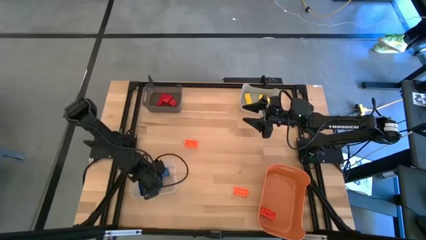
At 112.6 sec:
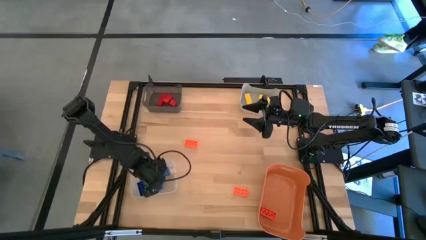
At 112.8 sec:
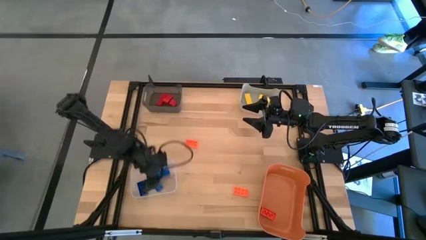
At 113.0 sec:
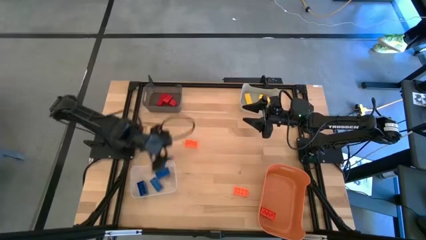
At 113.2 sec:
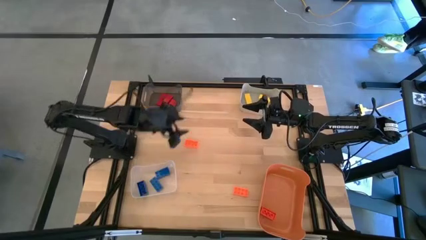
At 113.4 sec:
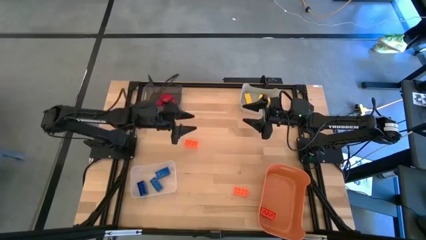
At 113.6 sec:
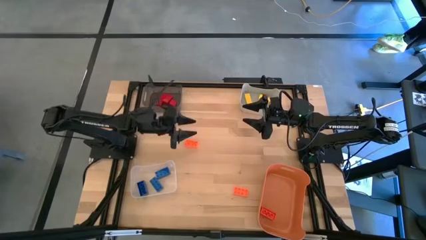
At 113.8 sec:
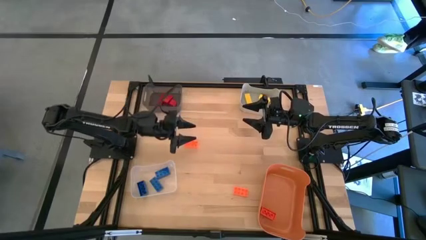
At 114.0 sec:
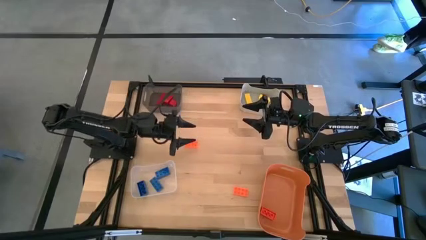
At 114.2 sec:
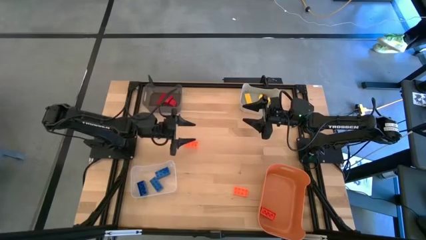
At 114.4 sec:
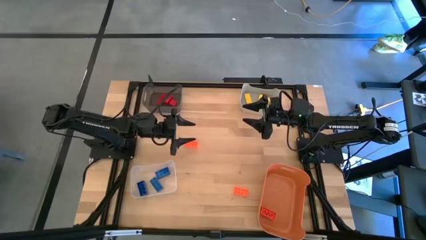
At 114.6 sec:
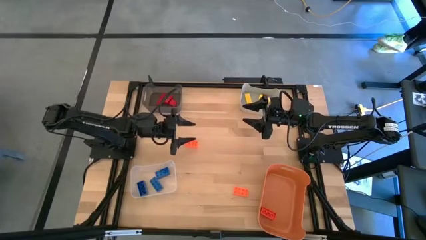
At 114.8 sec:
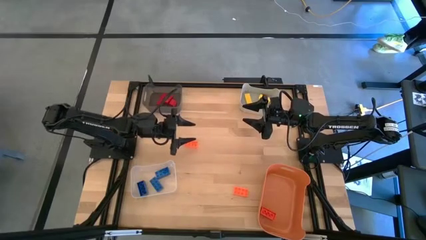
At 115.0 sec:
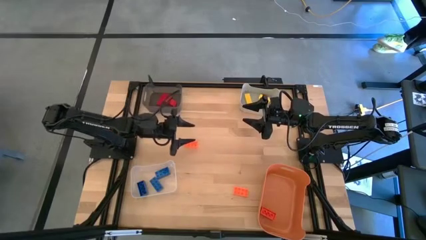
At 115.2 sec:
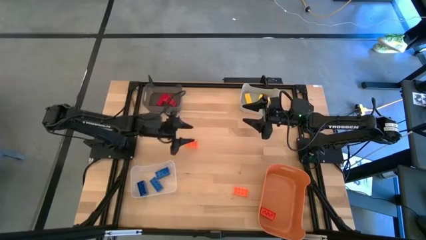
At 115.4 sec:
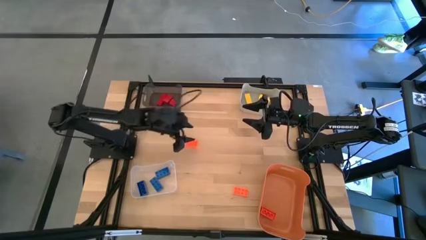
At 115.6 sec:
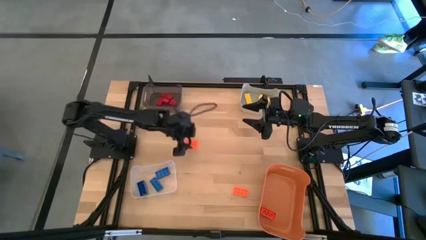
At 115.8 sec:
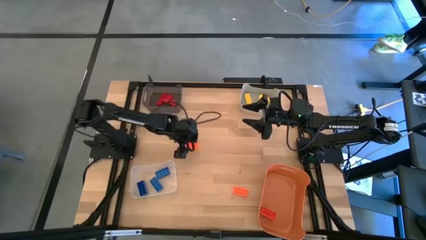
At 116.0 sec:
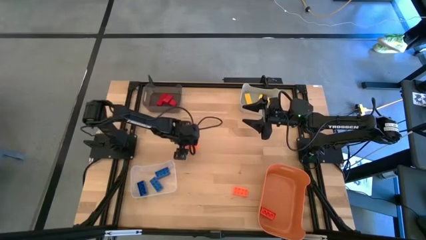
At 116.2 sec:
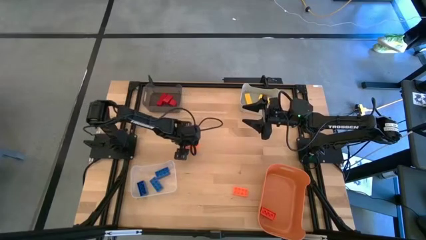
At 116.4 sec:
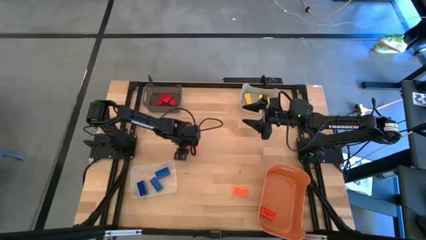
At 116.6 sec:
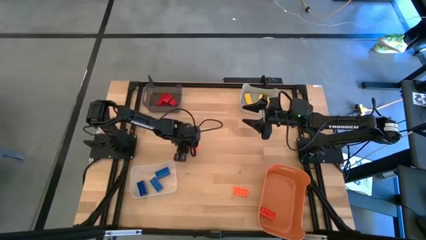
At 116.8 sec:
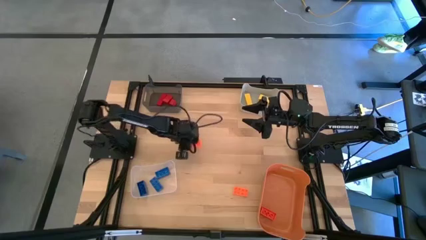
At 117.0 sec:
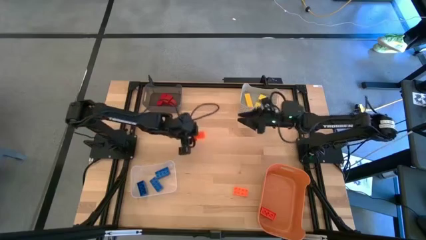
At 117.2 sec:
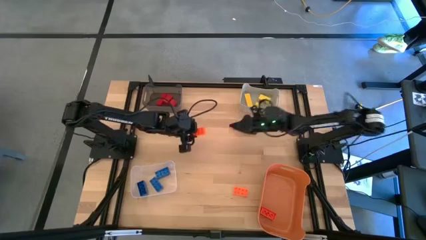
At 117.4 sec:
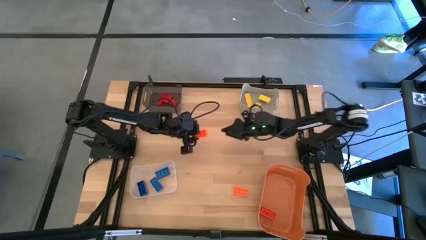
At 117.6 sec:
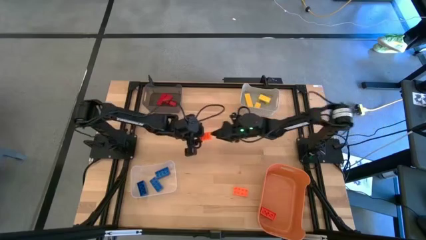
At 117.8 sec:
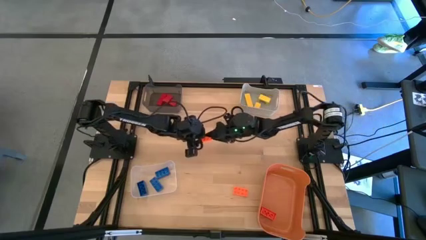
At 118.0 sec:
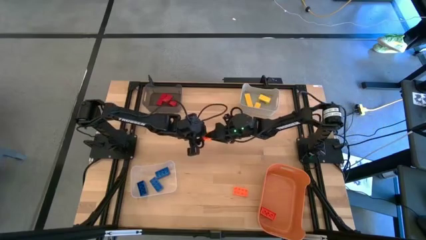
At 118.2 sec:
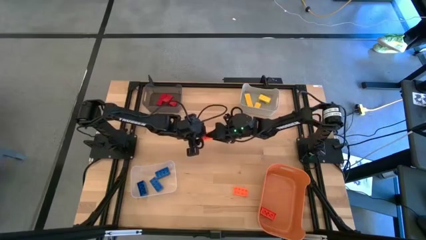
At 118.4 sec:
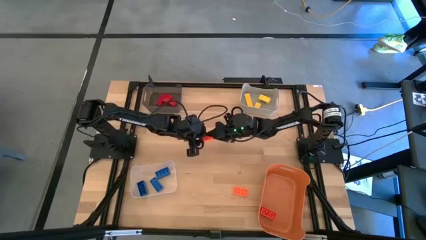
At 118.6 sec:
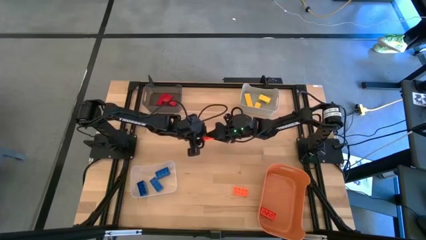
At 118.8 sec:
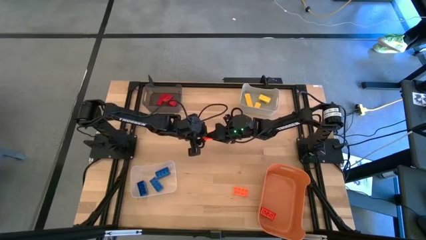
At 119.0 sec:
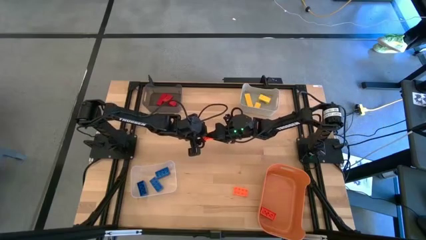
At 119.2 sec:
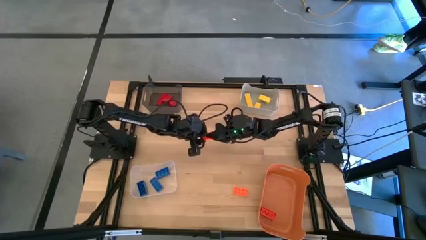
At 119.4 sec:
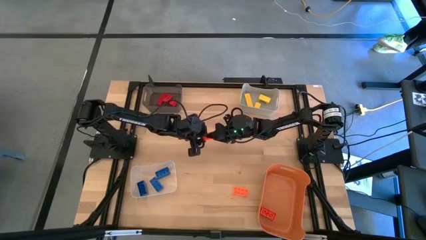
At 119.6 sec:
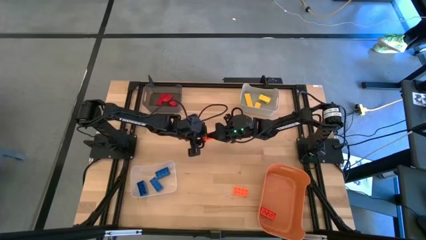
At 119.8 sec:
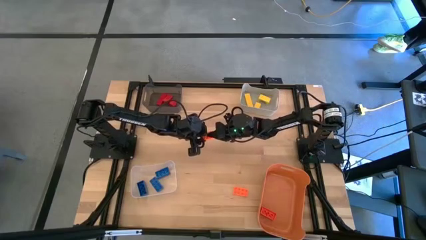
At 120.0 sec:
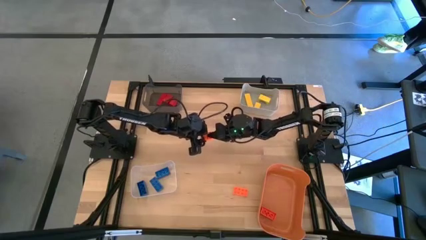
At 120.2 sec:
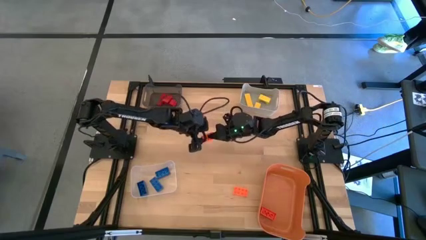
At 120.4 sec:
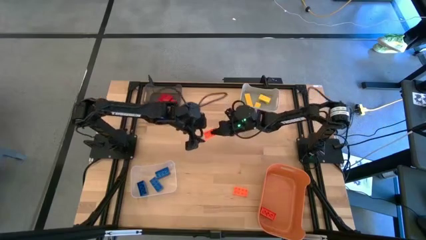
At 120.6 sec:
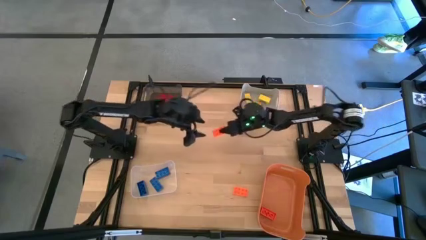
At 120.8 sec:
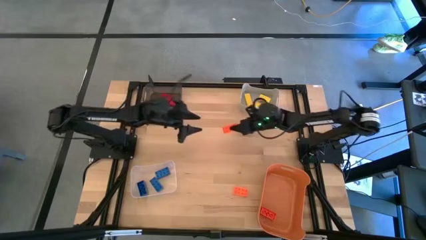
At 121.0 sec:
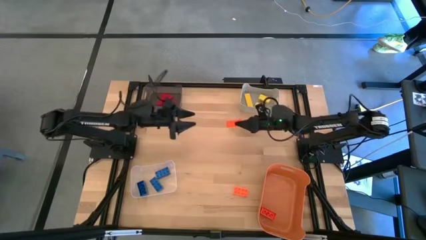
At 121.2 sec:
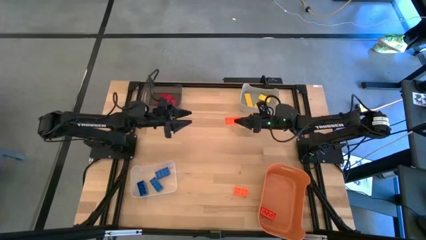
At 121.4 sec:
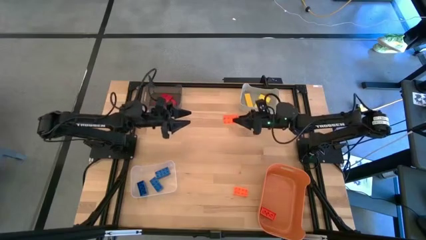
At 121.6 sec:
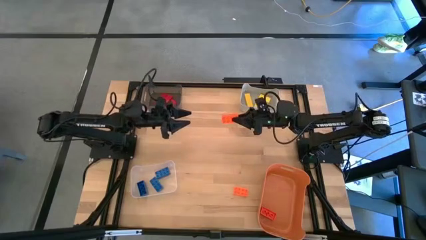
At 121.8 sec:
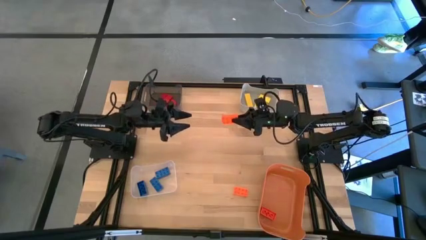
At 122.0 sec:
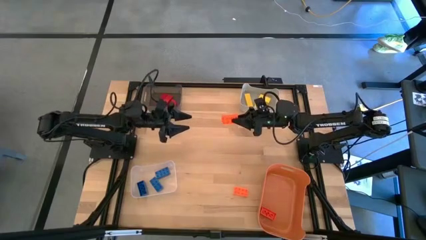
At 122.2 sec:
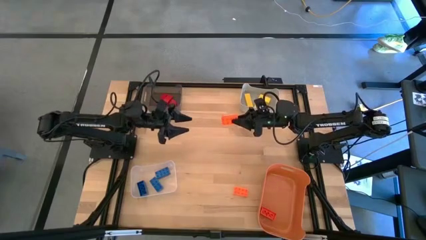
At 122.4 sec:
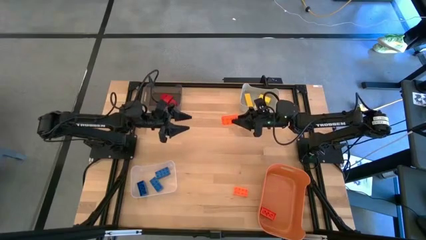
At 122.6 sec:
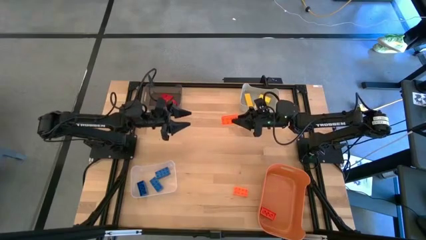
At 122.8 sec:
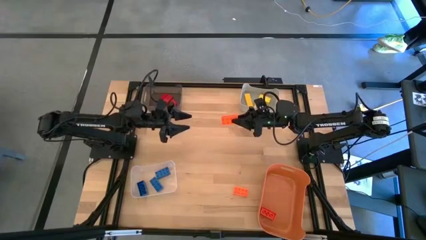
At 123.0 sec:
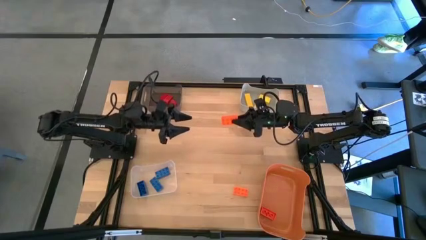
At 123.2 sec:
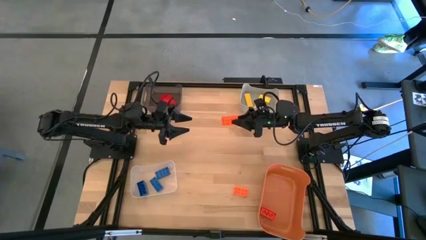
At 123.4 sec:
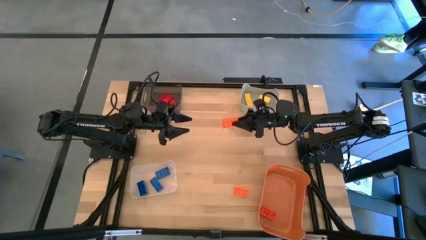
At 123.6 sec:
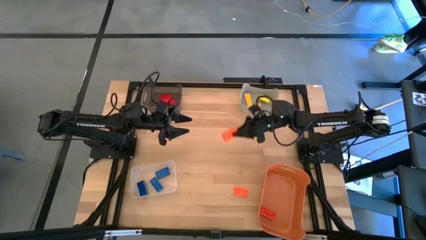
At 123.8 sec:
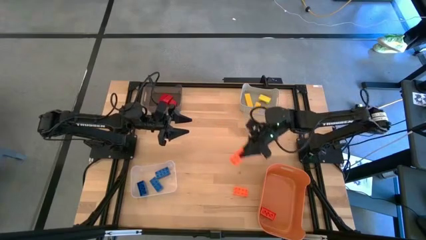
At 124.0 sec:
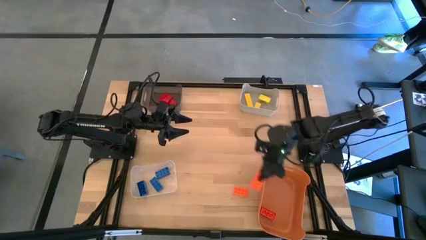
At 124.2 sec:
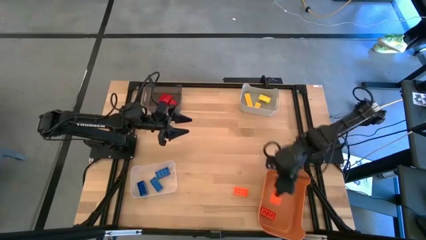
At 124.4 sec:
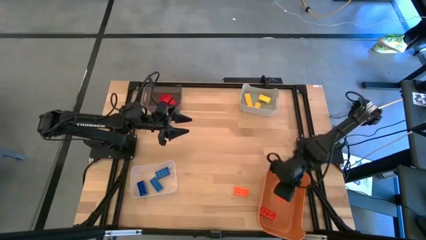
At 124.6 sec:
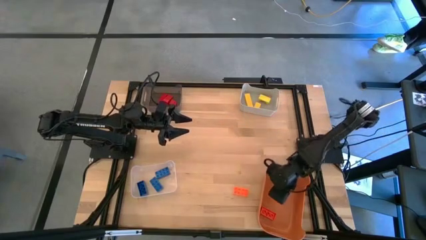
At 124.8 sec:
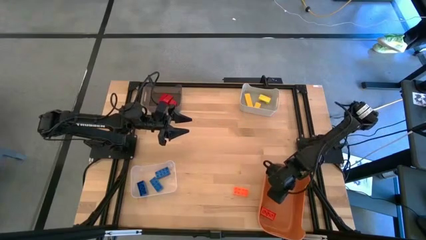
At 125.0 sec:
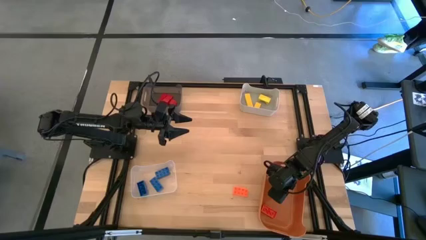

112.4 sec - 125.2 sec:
Task: Sort & place blocks by color
Put the top orange game piece into the orange bin
